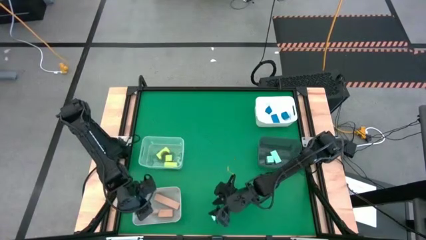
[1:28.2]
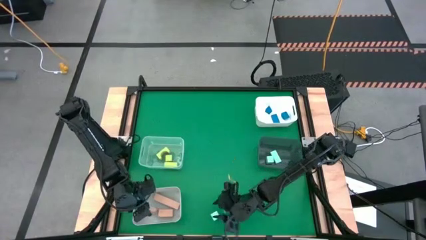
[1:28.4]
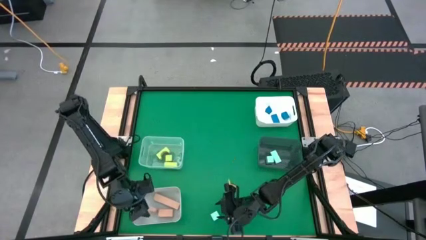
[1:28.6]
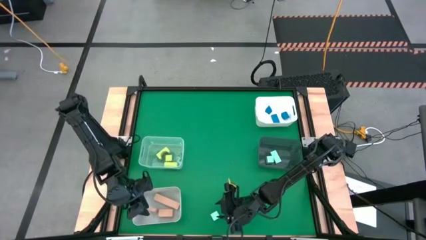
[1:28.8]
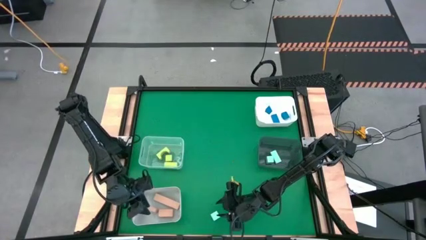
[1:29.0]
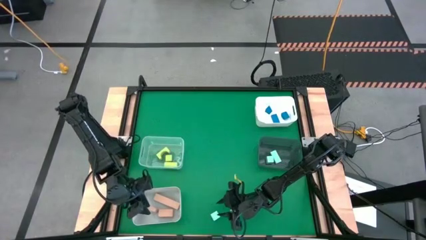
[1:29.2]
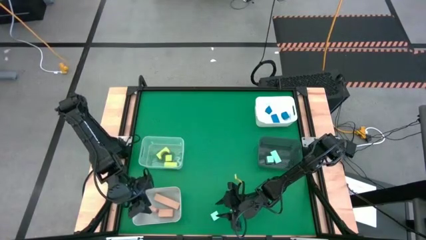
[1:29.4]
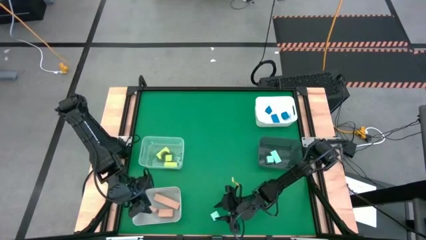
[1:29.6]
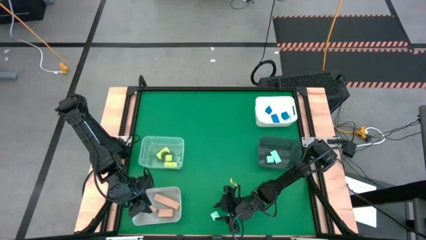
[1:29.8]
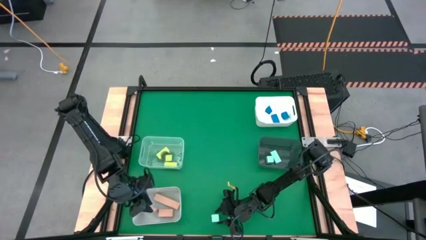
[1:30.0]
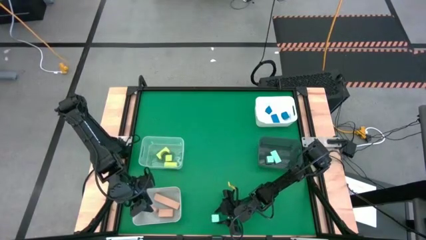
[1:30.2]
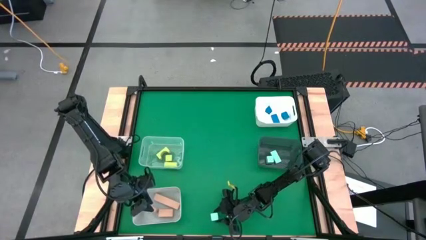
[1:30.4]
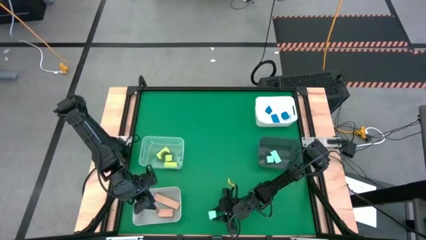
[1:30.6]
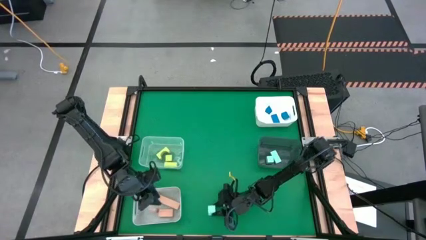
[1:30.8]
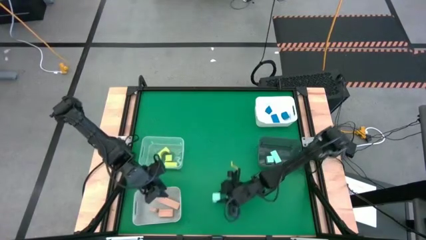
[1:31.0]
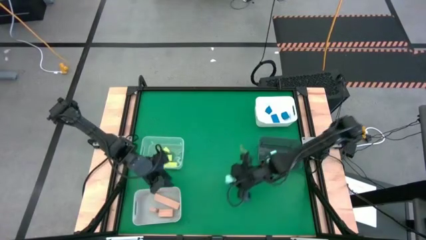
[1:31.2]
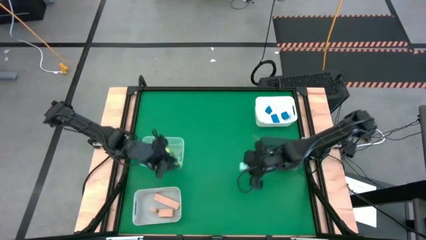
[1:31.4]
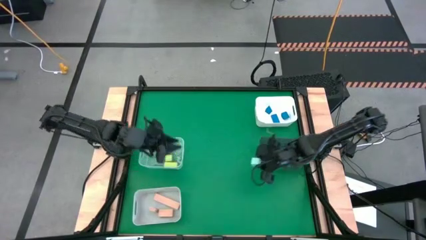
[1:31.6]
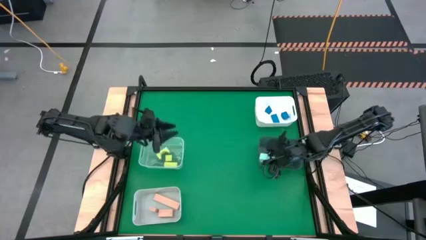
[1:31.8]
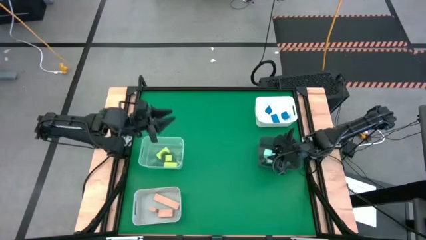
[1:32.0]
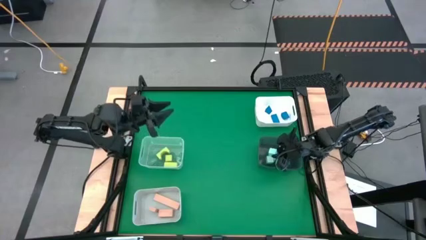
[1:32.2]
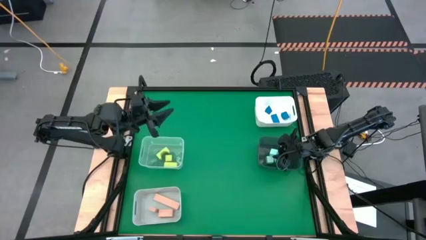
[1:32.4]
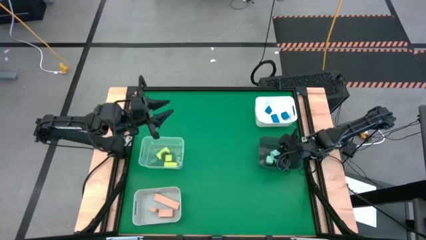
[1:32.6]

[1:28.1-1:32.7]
Task: Sort & place blocks by color
Put the light blue block into the black bin

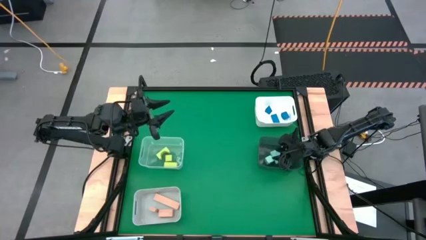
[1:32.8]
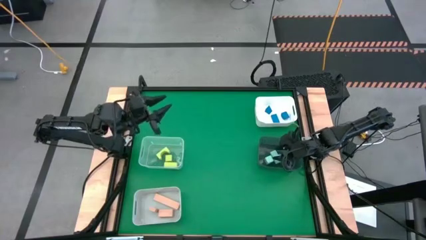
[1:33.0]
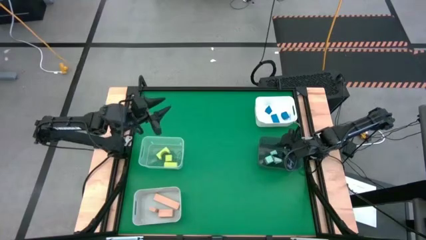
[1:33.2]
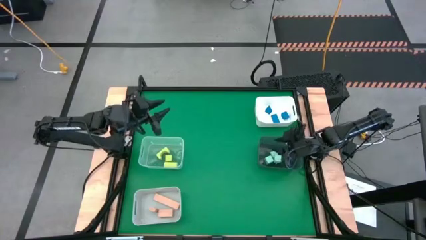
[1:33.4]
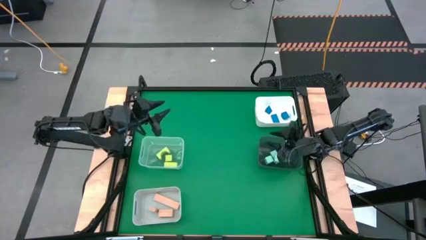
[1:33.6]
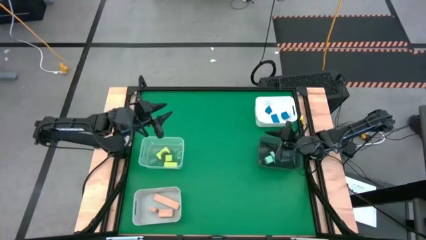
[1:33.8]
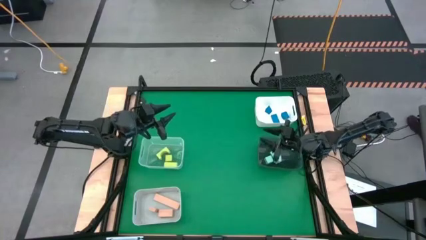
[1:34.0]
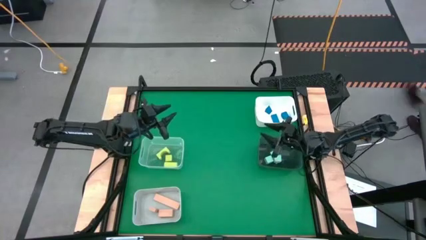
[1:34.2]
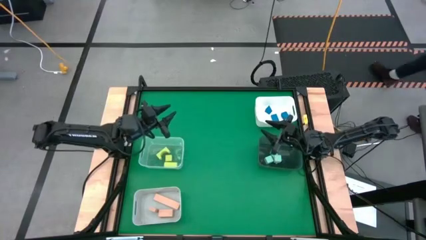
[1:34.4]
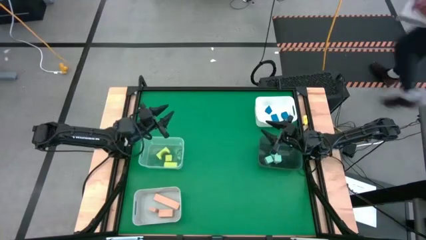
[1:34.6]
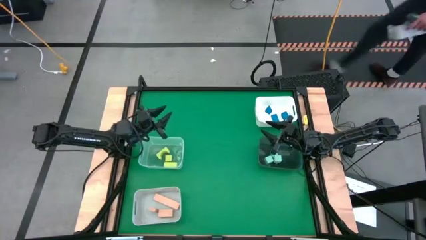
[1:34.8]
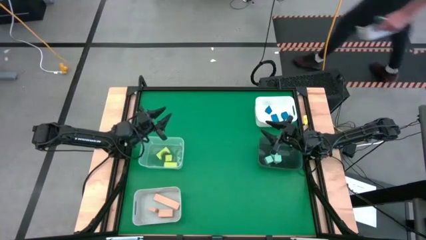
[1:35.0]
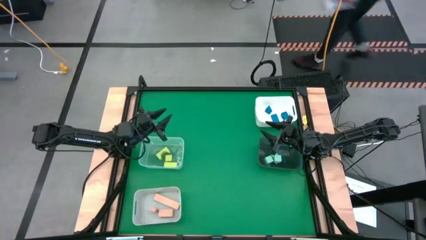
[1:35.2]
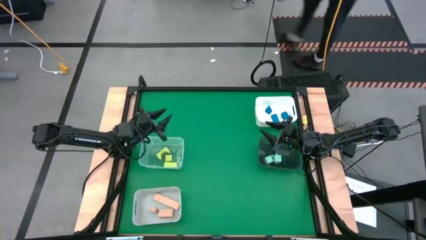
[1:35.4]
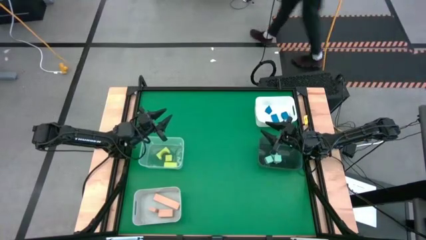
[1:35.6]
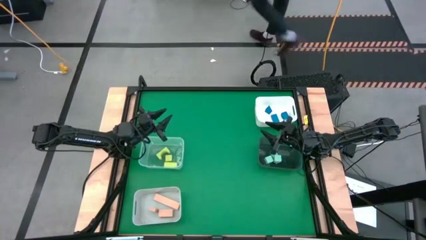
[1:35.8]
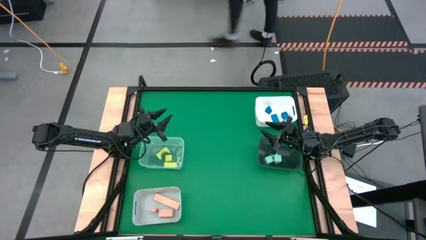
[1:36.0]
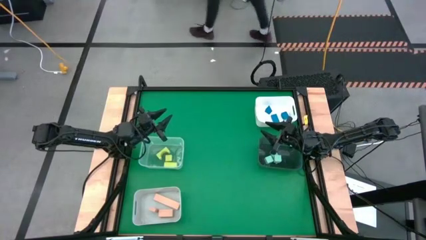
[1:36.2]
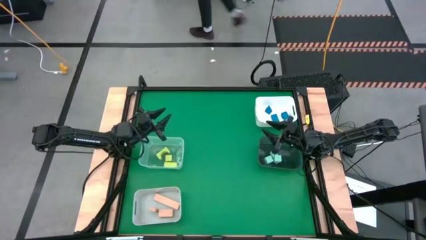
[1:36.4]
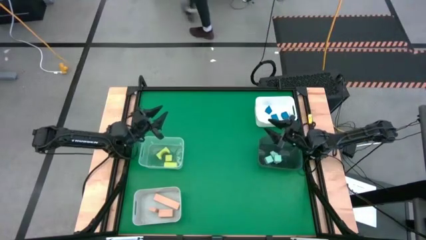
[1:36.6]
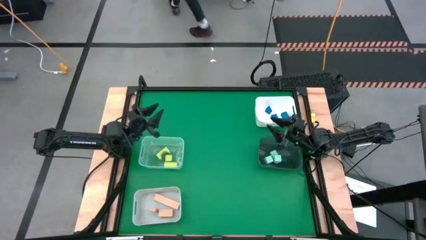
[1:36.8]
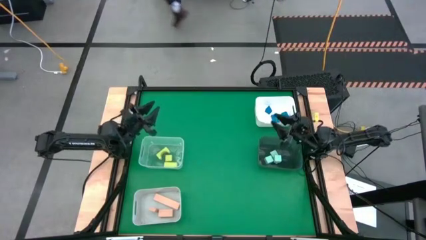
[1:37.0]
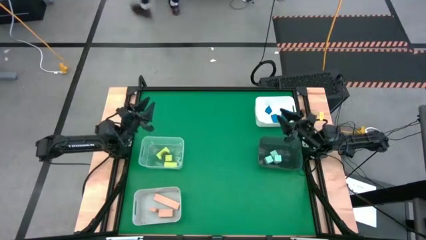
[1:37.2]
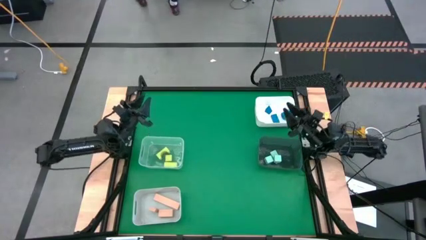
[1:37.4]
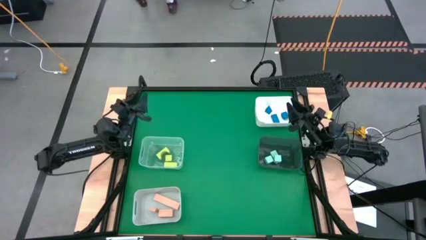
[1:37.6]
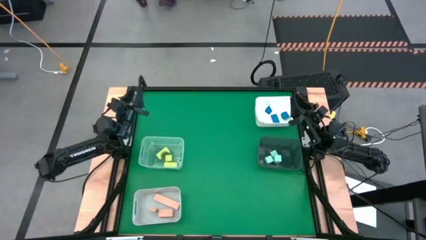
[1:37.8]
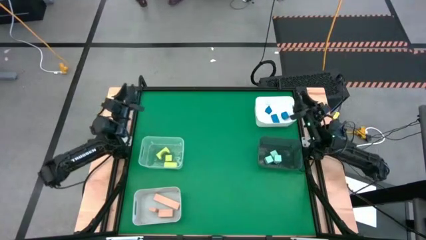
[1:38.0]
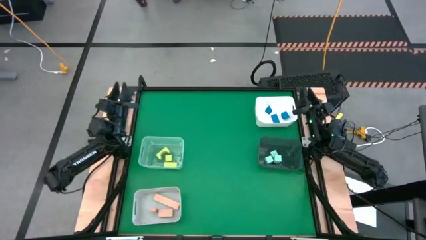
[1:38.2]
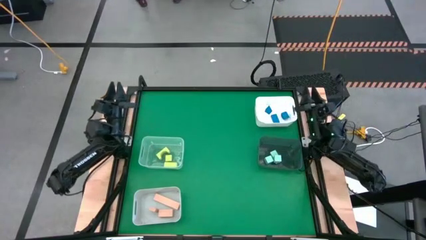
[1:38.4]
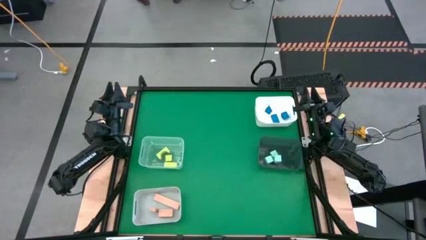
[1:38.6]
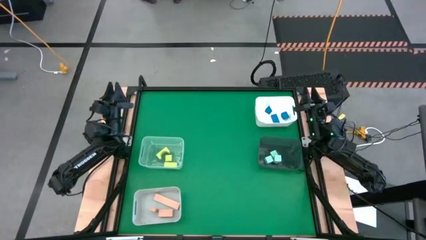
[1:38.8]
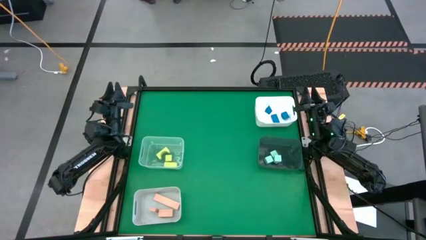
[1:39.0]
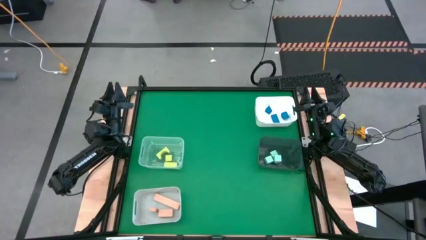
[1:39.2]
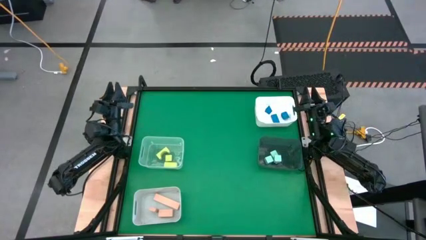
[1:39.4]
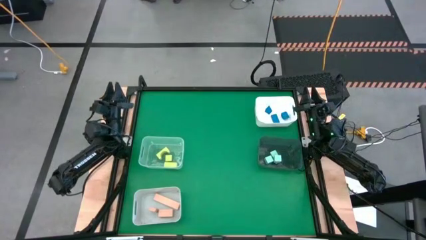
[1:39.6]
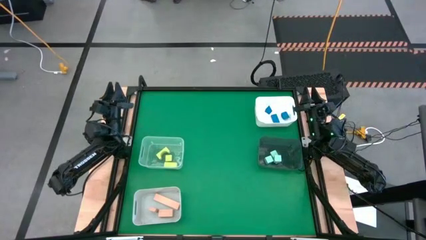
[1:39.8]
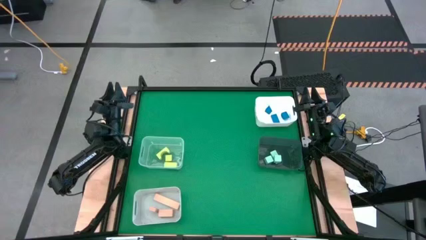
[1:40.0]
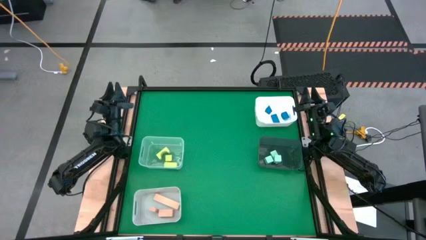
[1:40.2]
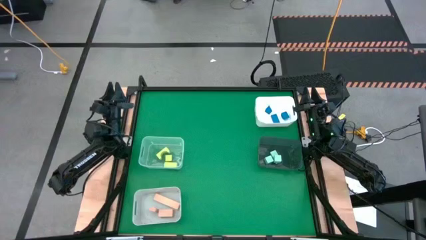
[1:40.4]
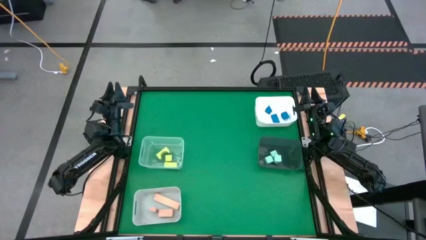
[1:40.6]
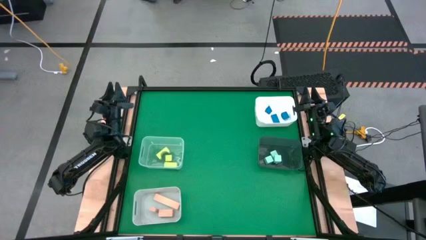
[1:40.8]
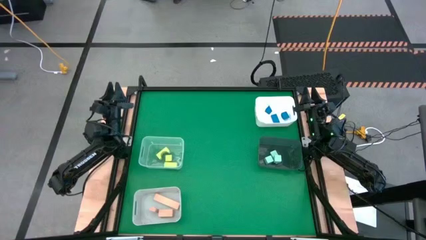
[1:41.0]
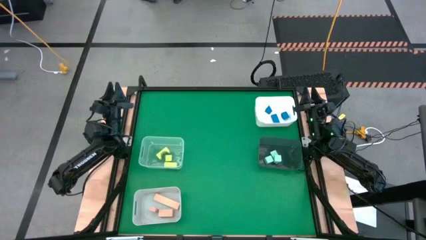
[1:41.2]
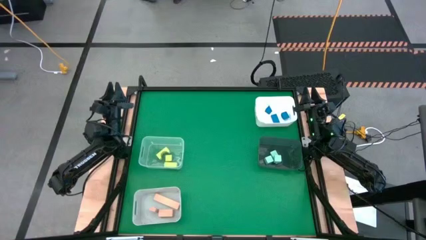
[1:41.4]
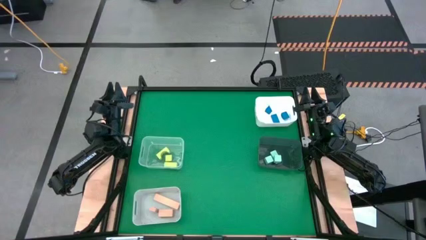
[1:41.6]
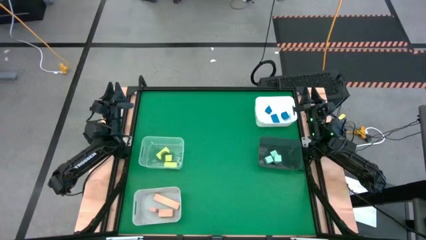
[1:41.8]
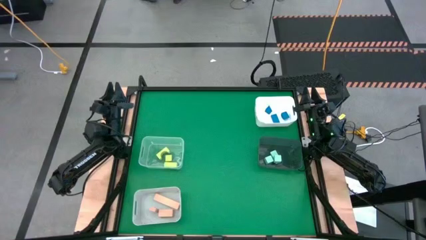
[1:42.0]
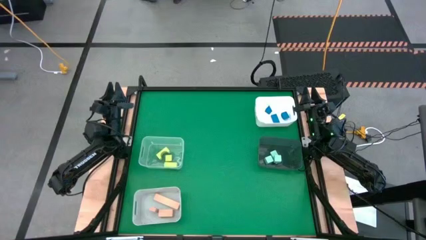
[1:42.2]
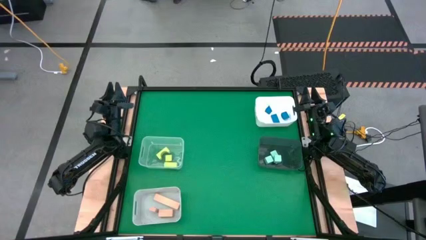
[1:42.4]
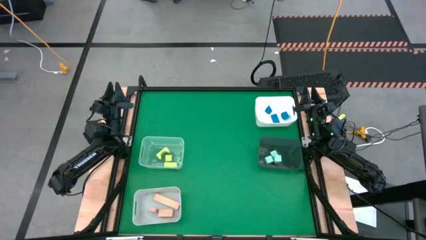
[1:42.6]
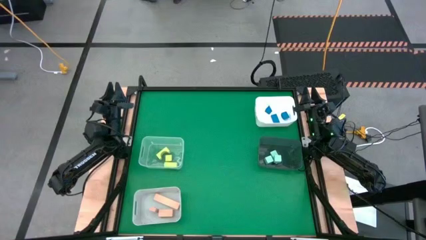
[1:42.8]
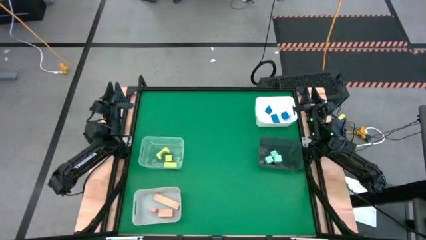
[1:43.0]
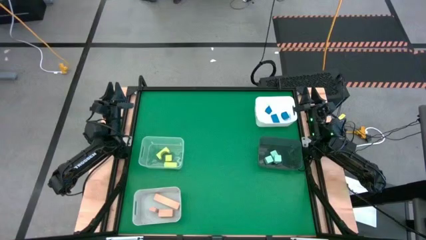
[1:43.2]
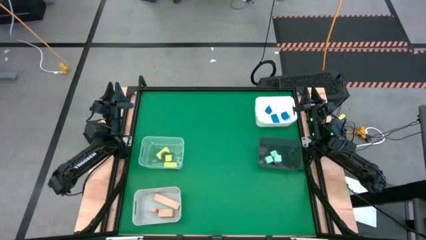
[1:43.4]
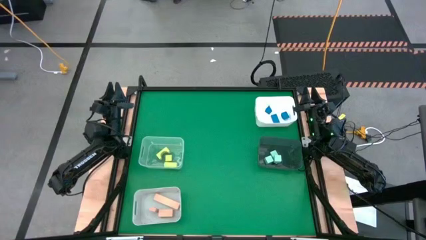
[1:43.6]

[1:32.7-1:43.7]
Return to Home Position
